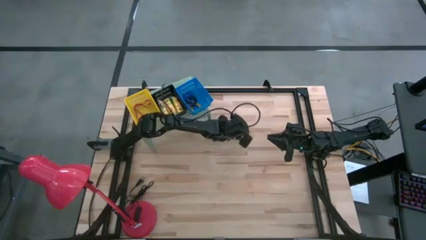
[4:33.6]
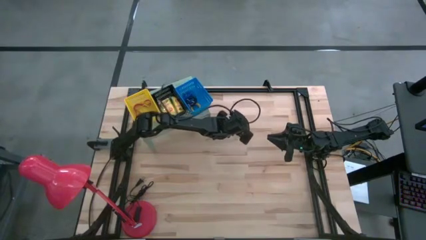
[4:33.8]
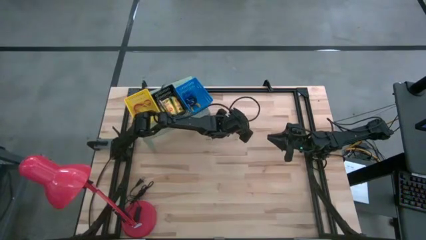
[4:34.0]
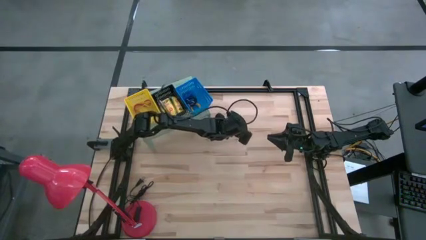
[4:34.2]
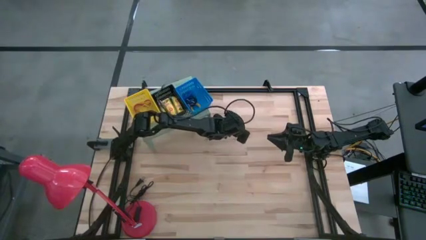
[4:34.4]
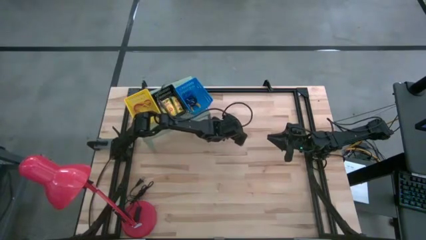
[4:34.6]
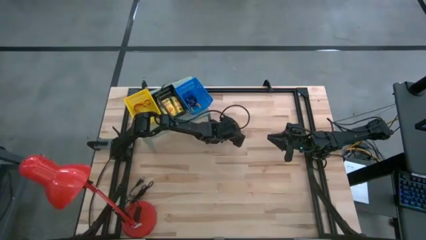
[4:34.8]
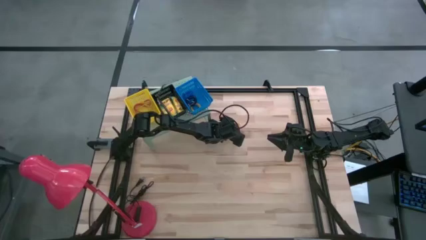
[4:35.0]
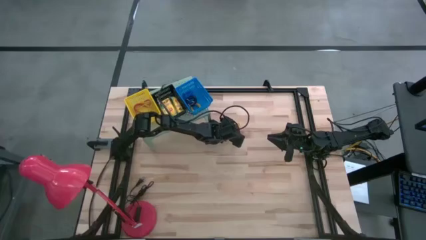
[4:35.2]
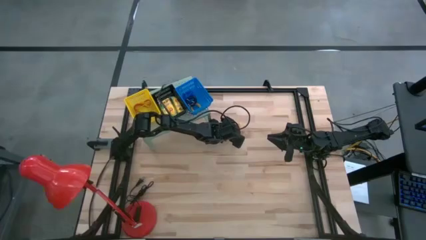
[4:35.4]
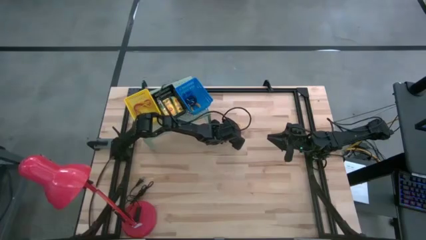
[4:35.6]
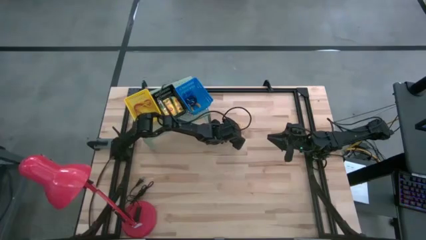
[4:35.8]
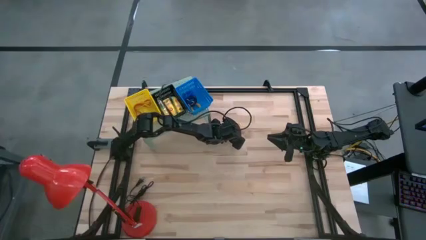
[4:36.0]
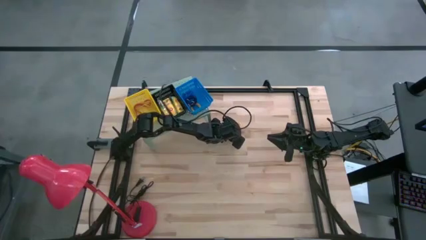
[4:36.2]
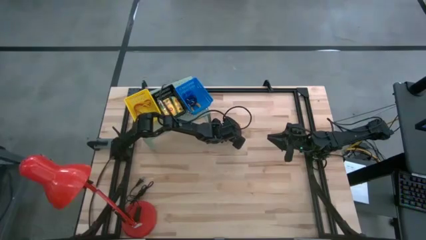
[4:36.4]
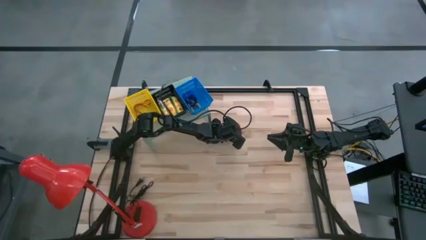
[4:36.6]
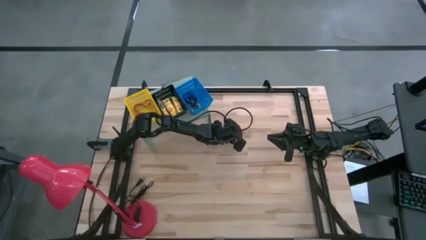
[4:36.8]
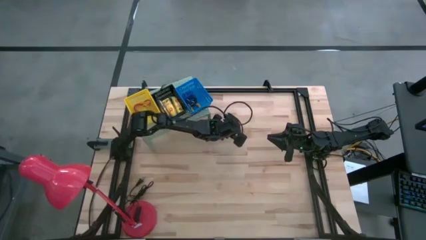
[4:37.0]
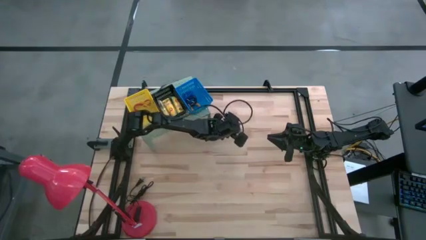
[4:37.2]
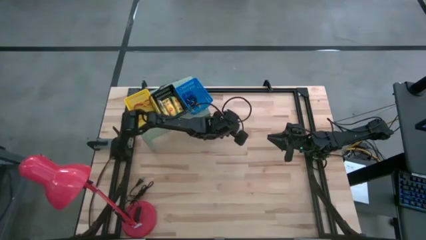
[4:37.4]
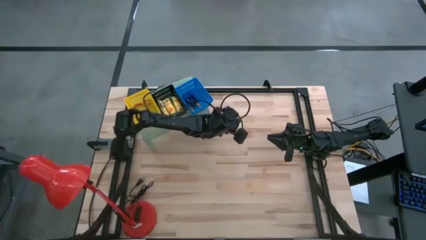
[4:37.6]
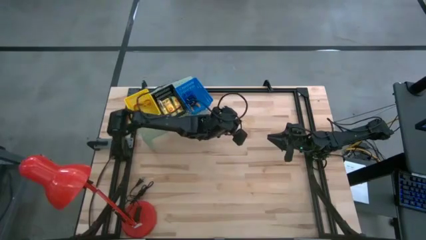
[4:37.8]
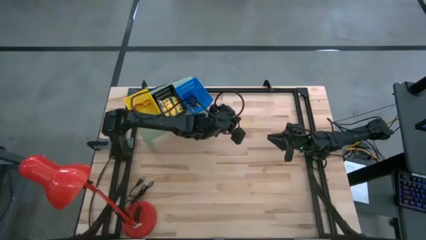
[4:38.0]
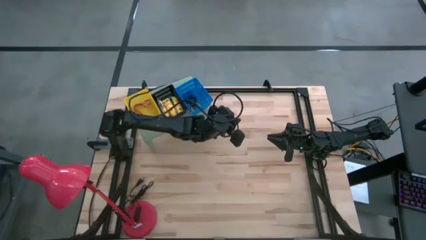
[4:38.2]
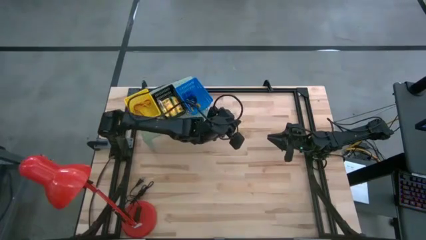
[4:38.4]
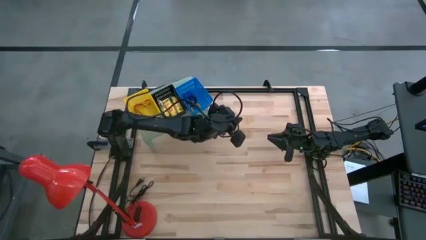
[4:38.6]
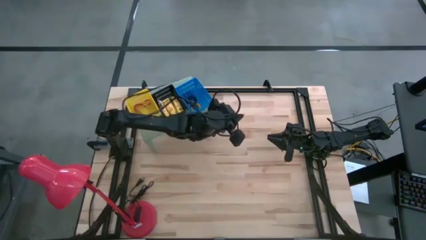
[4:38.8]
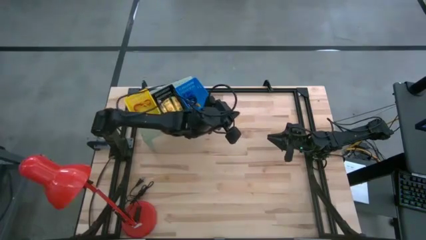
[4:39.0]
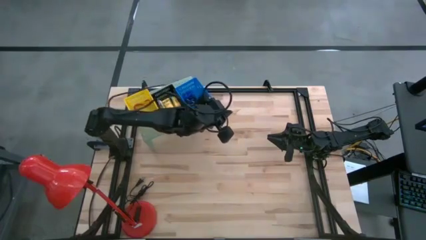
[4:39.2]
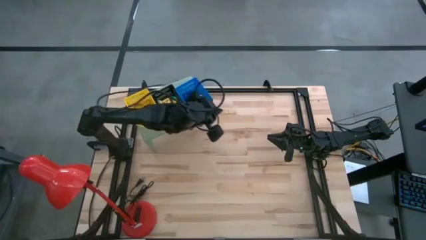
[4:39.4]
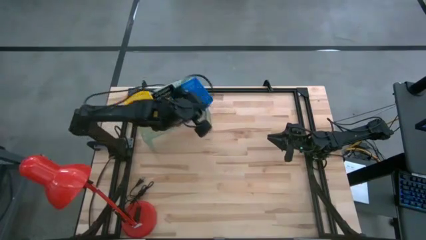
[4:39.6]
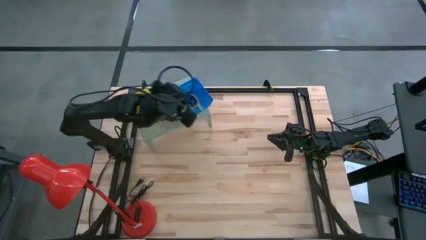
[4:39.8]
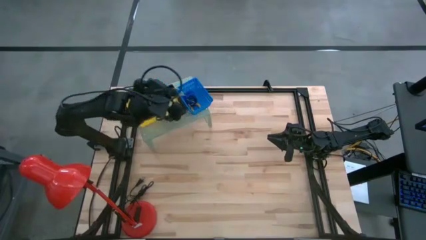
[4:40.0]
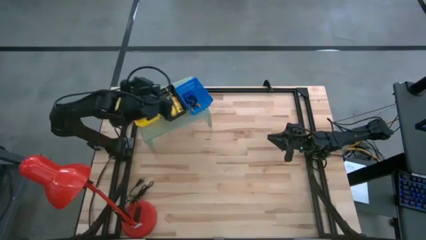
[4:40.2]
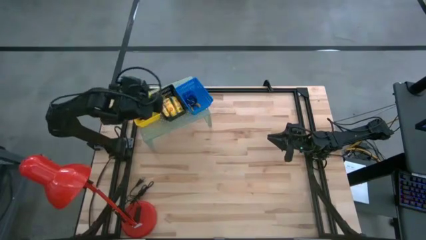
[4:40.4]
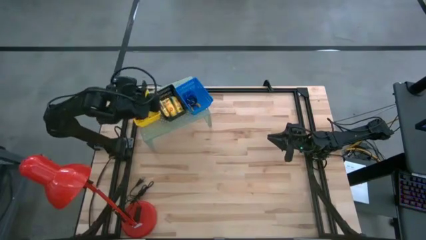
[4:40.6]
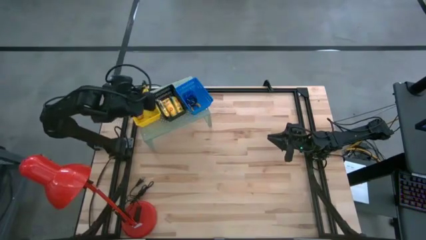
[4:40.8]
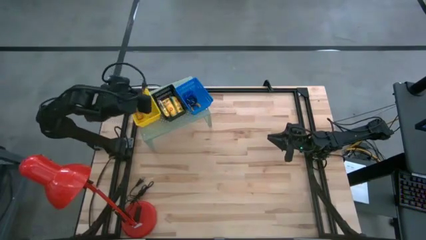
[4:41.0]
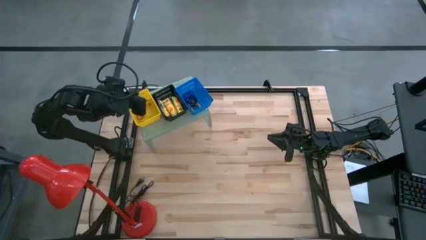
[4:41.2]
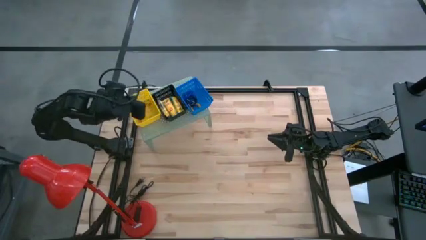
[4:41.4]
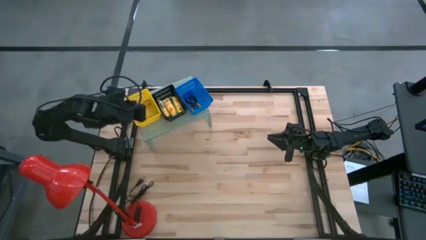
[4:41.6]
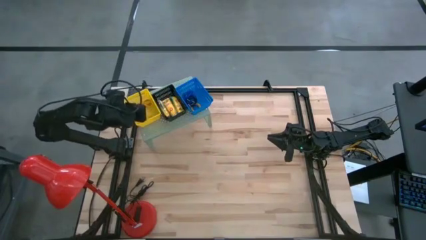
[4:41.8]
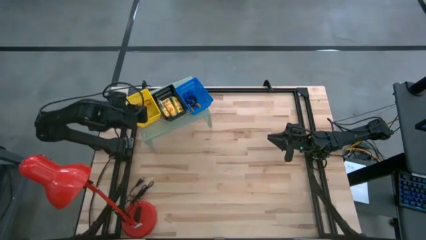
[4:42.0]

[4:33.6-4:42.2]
Task: Pick & Place Office Desk Supplies
Put the yellow rubber band into the yellow basket on the shelf

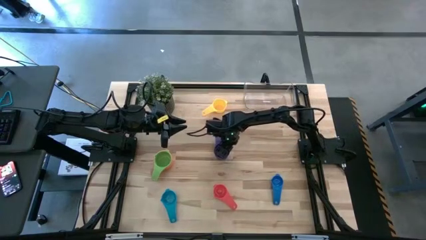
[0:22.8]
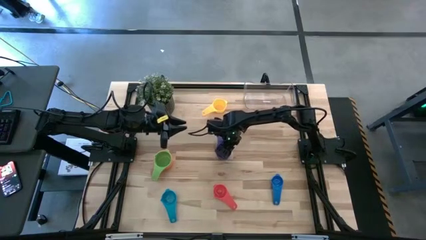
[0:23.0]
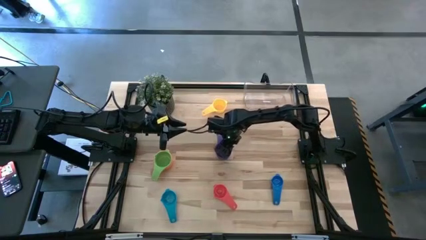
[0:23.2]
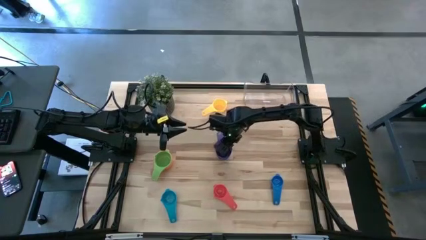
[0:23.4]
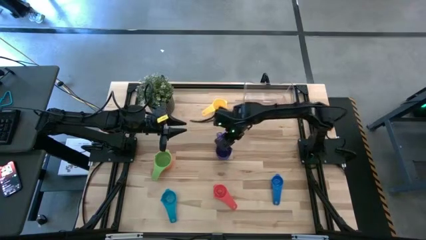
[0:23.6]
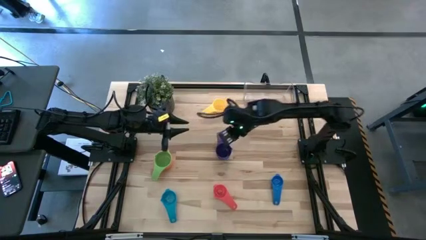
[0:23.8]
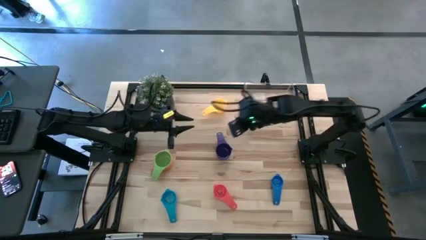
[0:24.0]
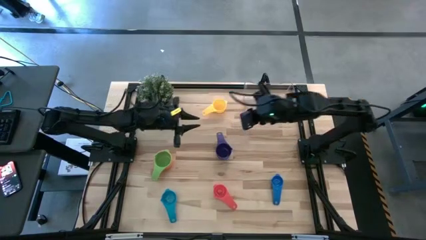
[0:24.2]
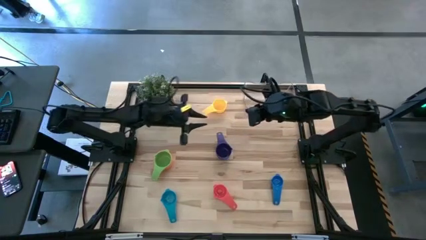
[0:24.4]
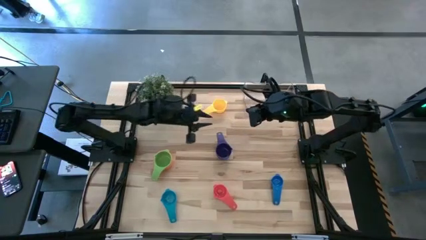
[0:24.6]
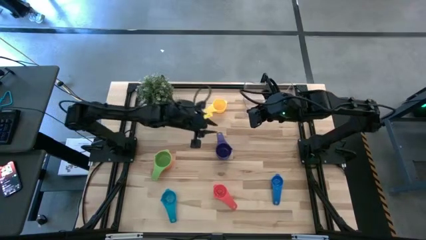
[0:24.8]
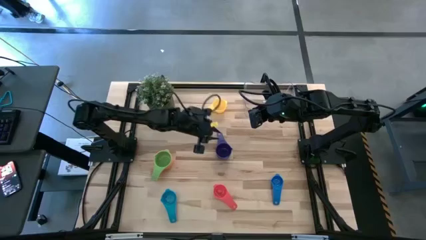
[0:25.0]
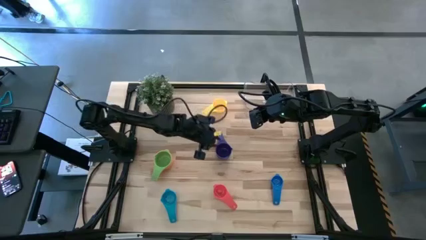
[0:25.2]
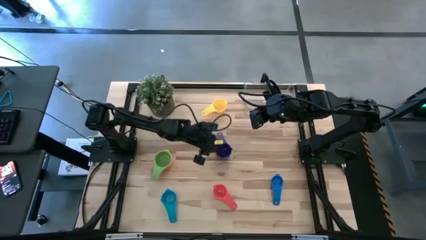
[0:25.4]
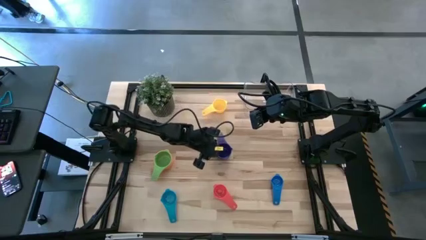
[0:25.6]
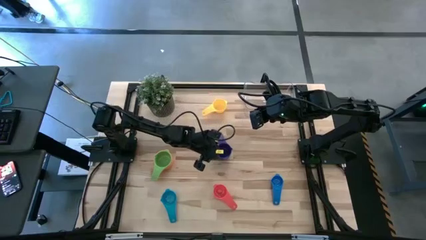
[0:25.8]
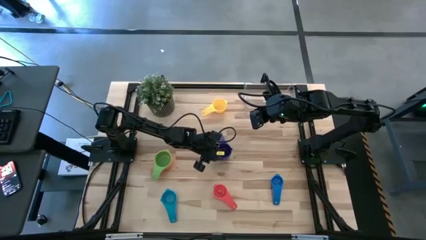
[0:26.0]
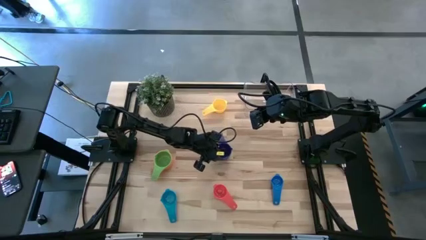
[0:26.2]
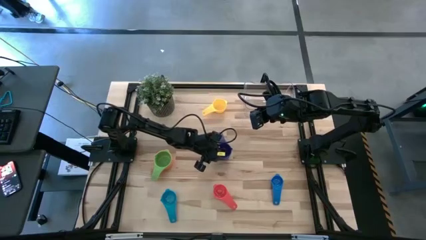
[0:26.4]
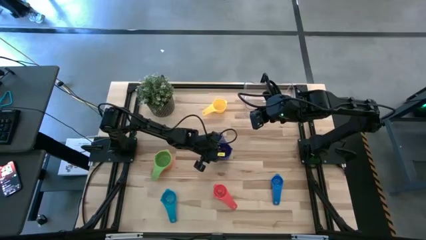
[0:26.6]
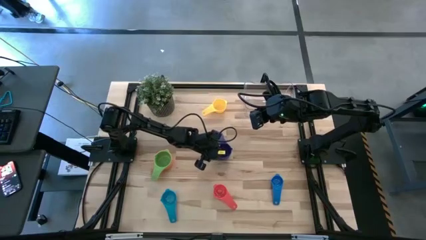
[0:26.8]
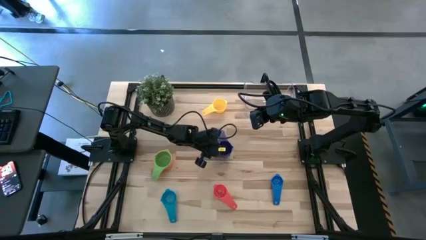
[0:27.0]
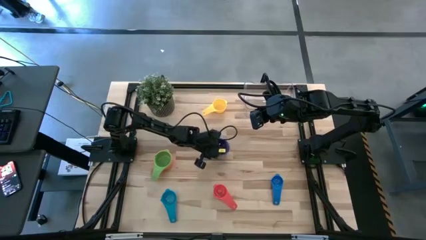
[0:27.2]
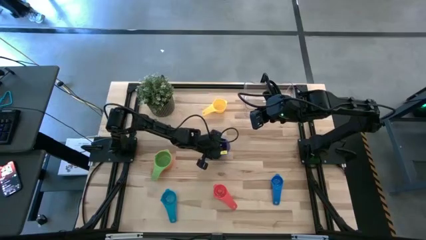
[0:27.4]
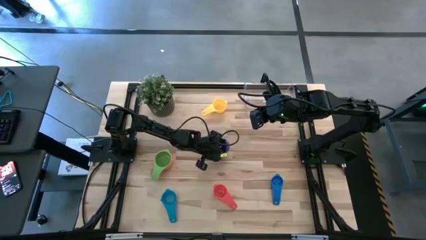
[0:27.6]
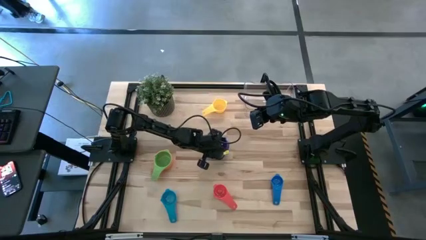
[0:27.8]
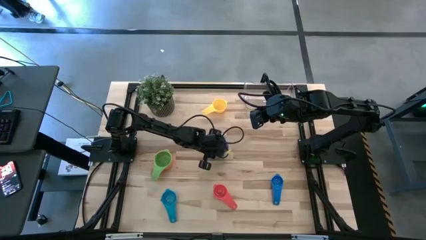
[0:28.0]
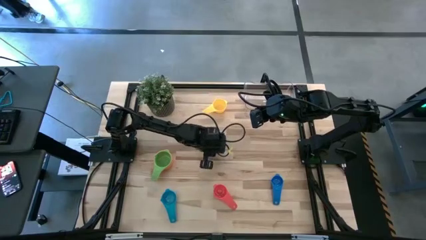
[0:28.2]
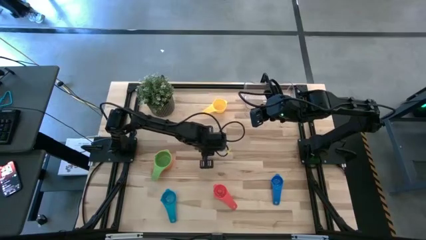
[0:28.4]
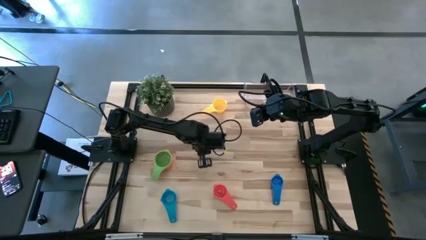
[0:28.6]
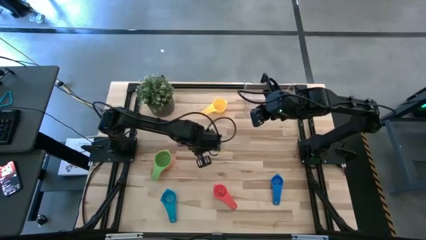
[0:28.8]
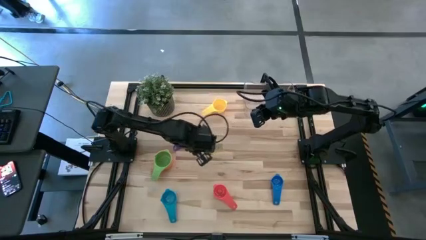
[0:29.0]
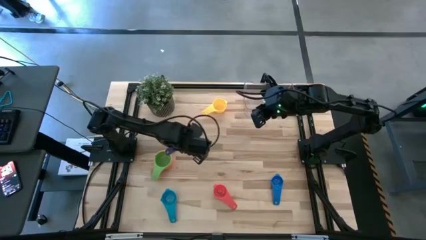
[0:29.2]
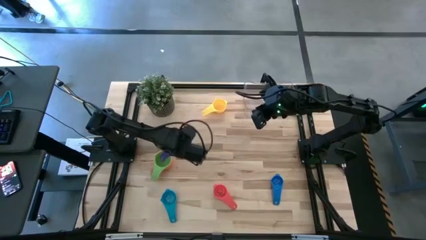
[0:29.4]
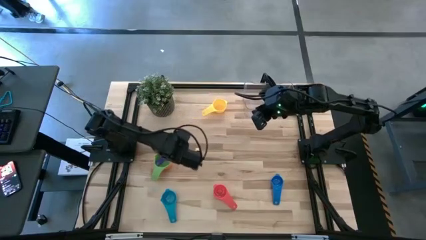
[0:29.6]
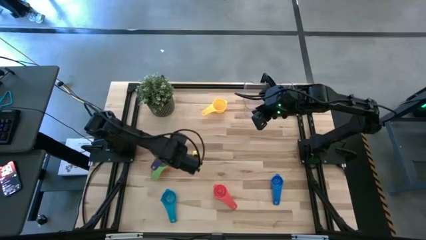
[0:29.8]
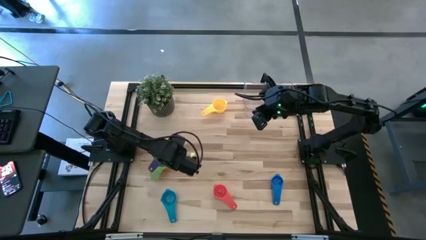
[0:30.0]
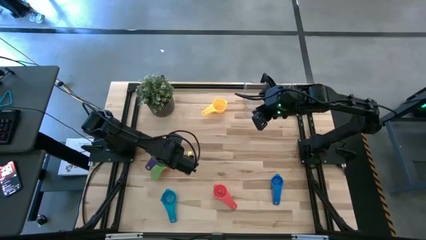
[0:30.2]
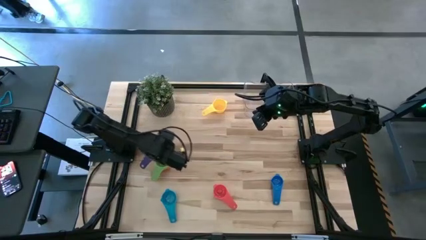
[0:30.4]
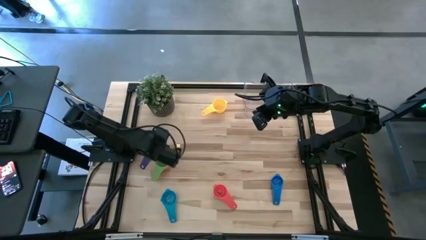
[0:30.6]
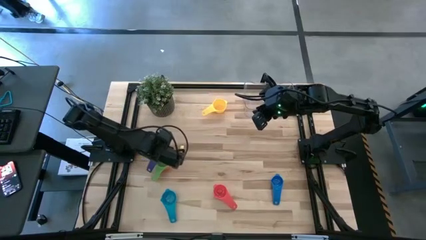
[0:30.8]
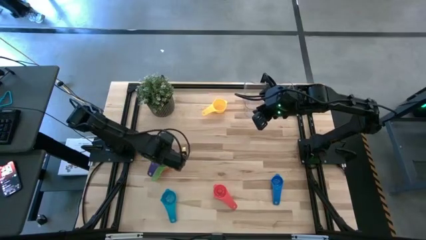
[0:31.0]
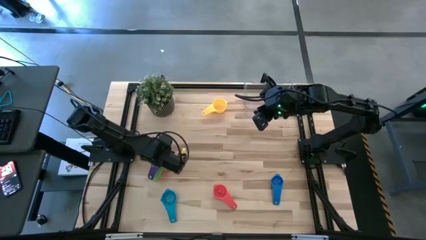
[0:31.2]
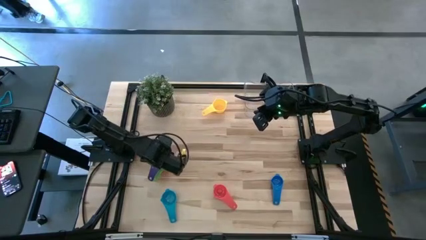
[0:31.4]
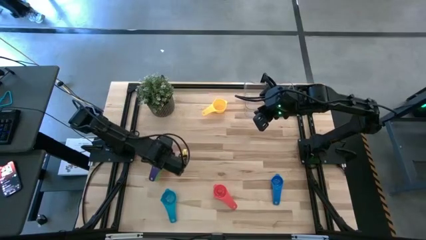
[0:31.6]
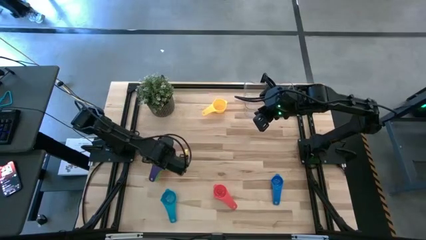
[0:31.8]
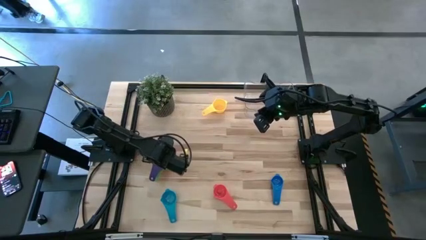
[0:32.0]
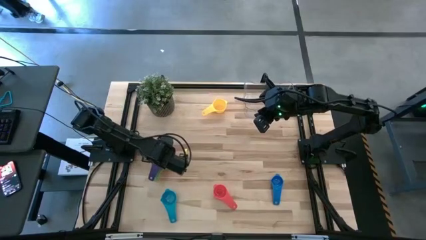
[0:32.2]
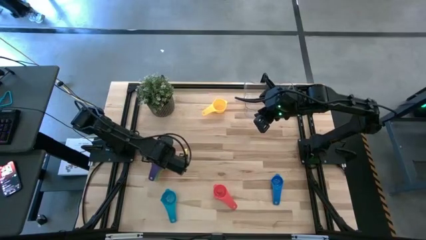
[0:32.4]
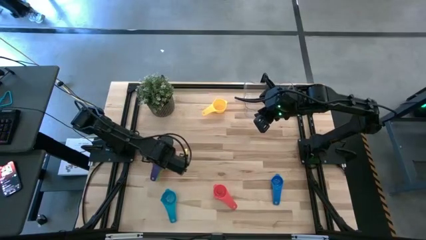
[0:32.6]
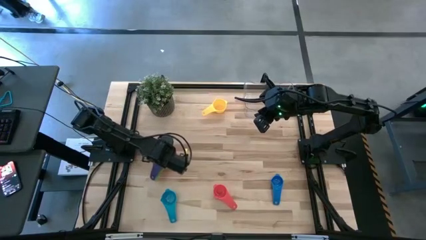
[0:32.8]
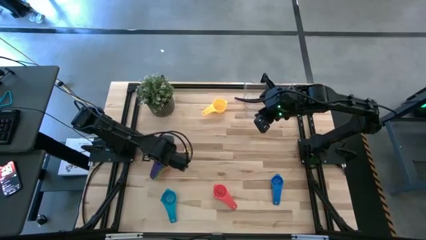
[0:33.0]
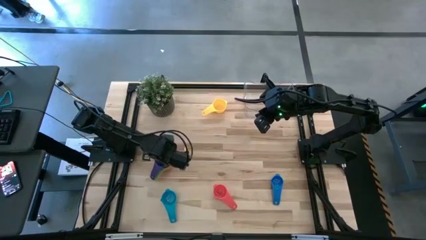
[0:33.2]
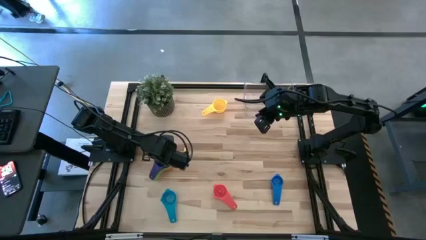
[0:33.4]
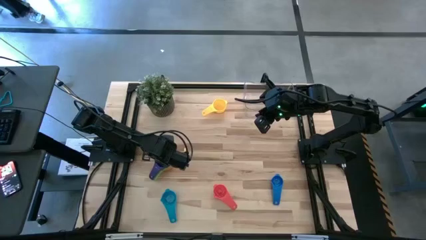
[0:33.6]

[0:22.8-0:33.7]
Task: Nest measuring cups in basket
Stack the violet measuring cup on top of the green measuring cup
